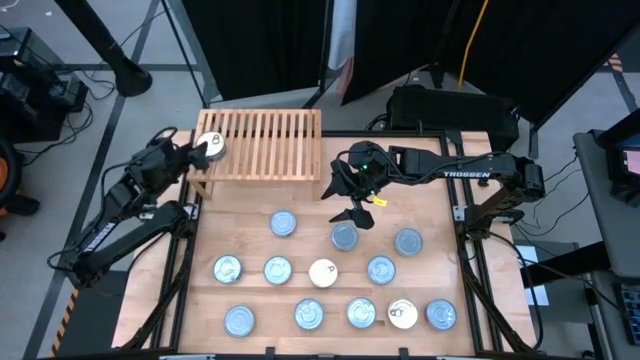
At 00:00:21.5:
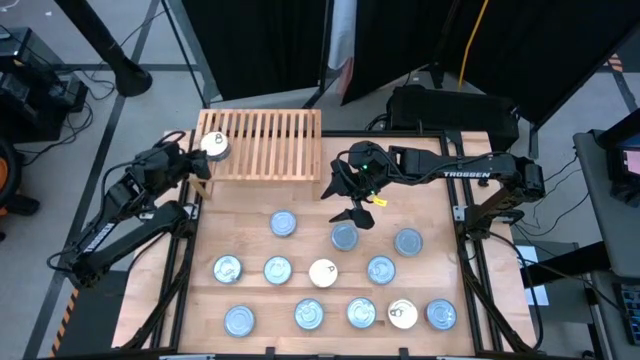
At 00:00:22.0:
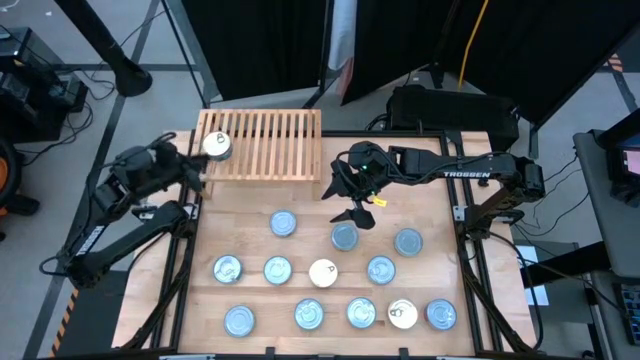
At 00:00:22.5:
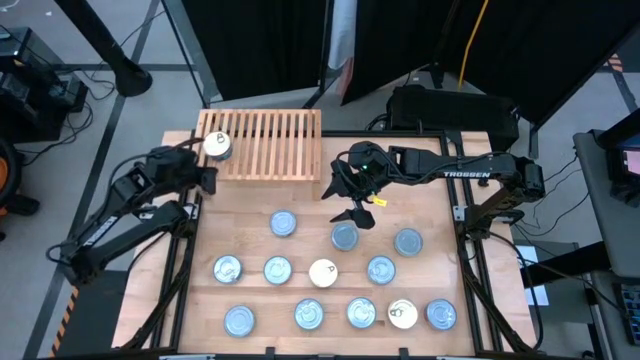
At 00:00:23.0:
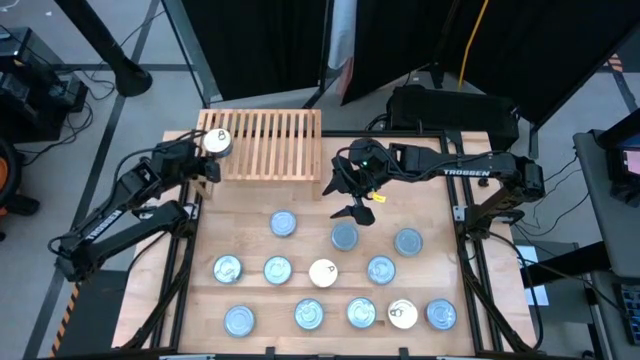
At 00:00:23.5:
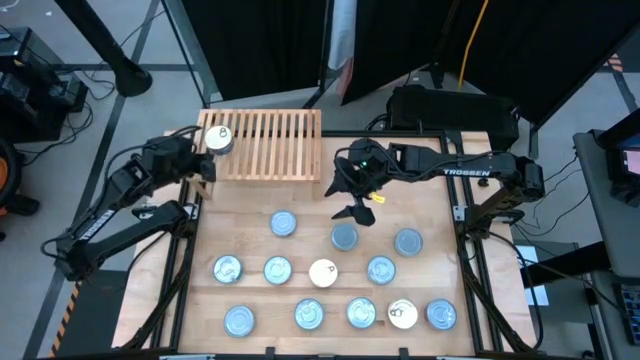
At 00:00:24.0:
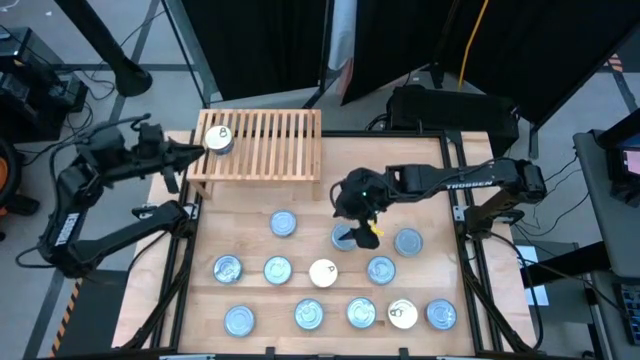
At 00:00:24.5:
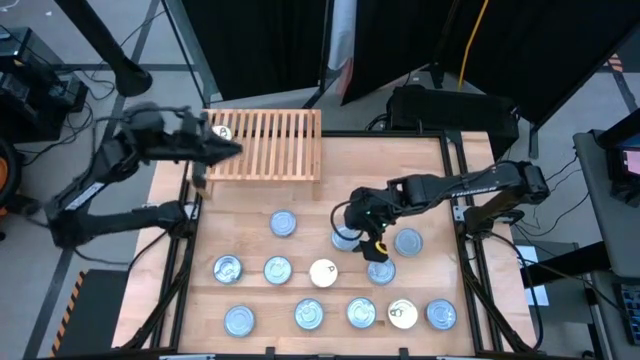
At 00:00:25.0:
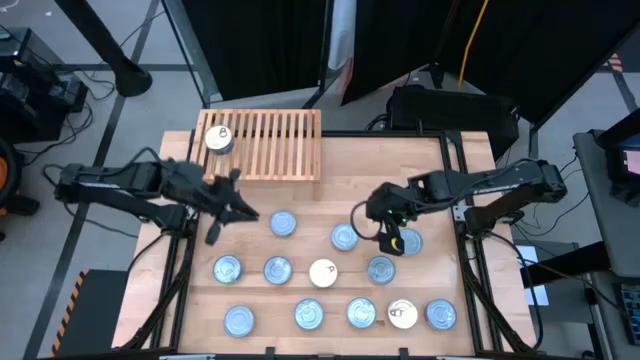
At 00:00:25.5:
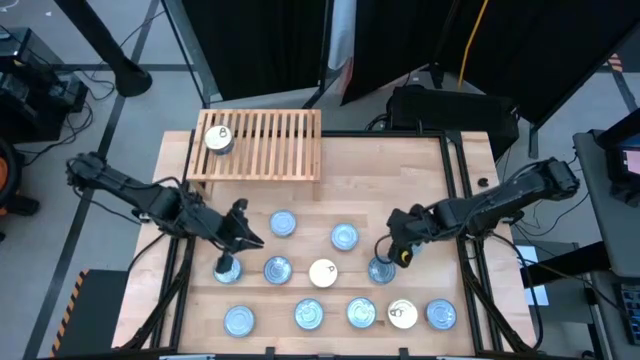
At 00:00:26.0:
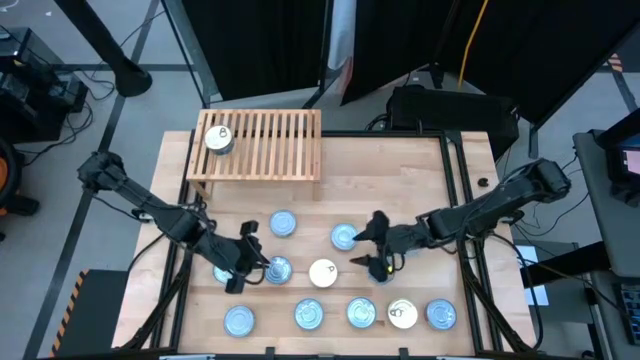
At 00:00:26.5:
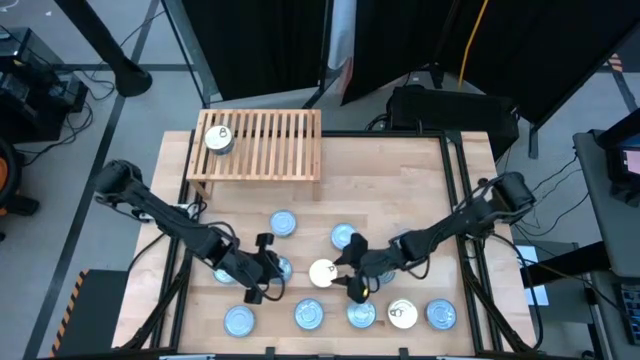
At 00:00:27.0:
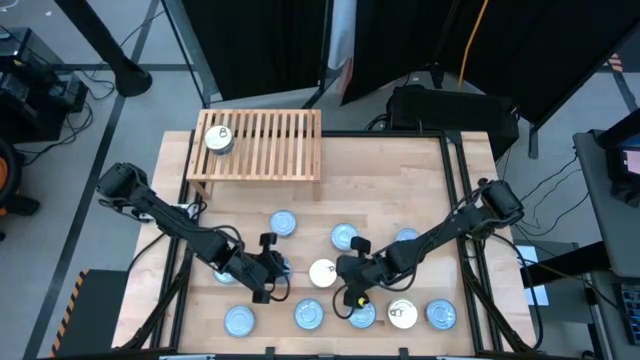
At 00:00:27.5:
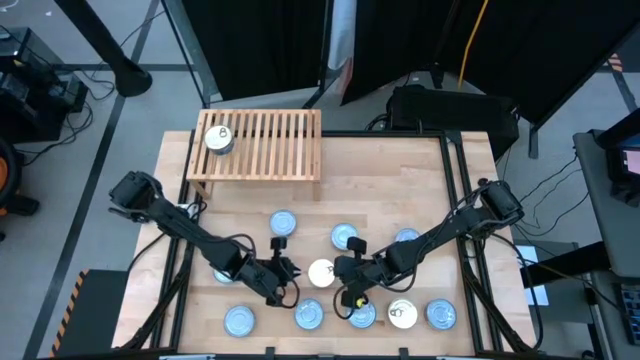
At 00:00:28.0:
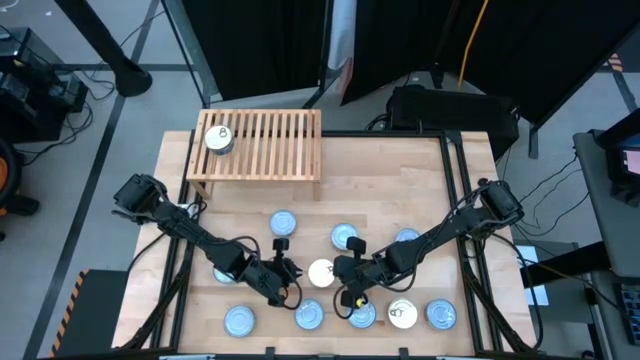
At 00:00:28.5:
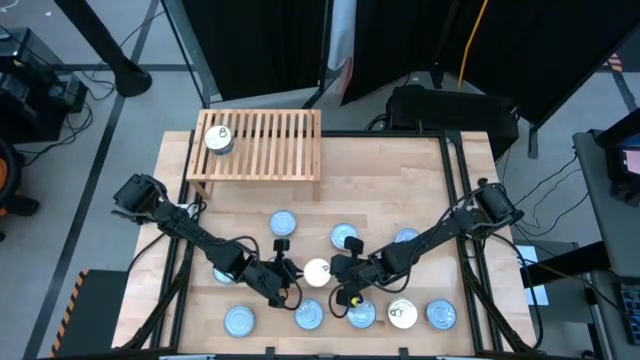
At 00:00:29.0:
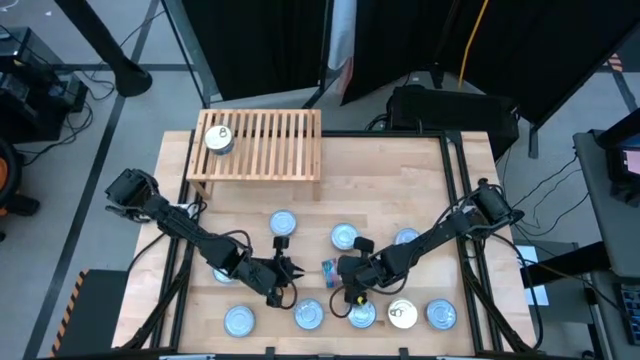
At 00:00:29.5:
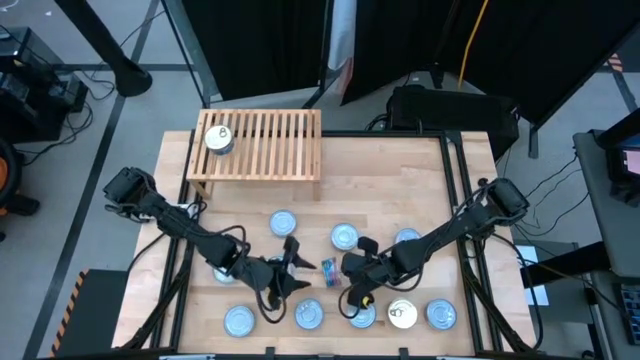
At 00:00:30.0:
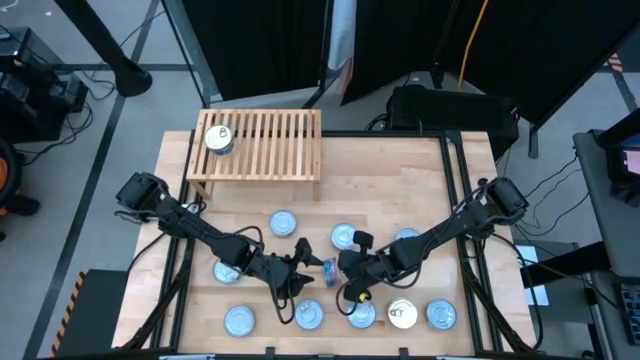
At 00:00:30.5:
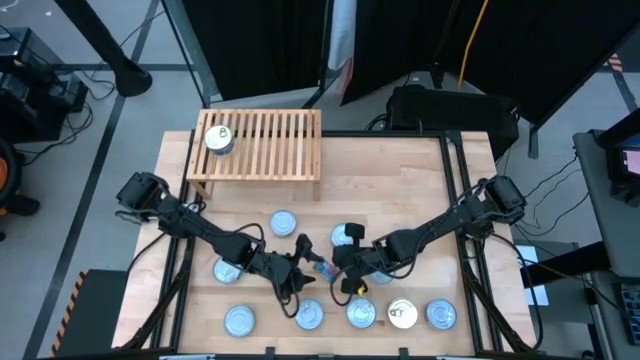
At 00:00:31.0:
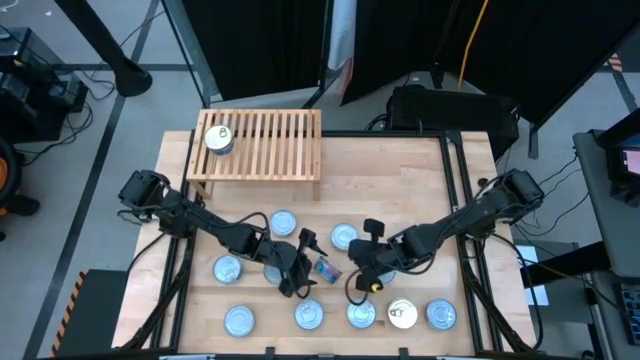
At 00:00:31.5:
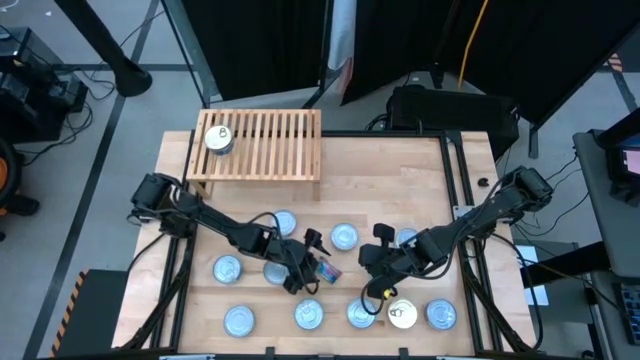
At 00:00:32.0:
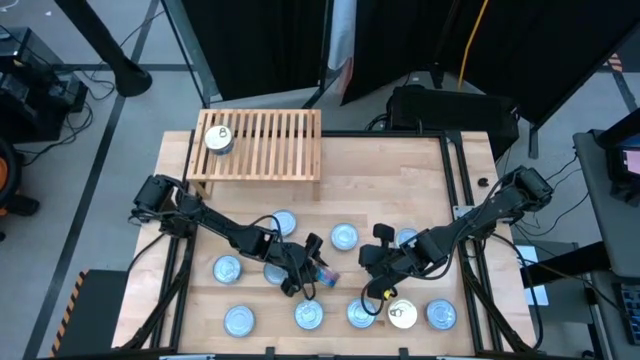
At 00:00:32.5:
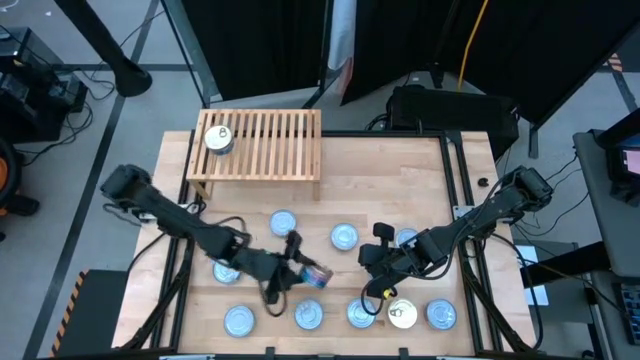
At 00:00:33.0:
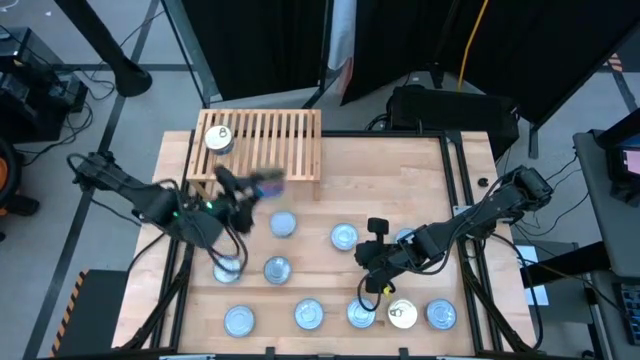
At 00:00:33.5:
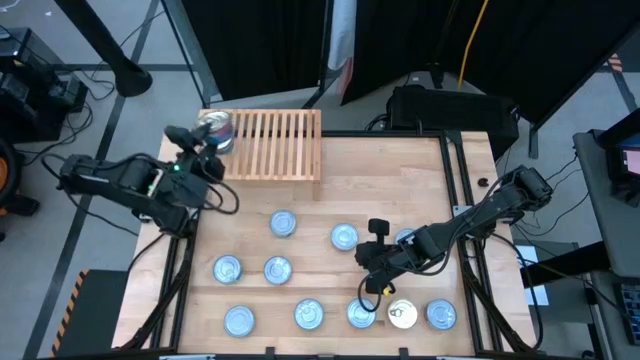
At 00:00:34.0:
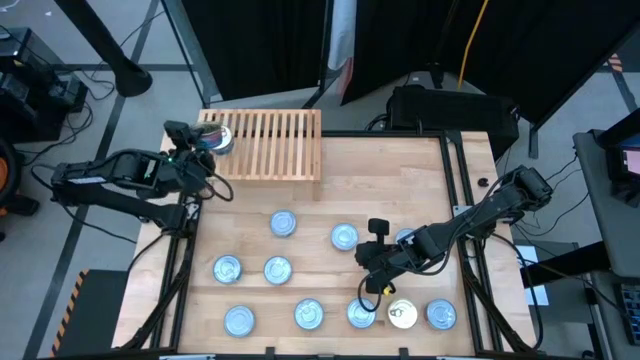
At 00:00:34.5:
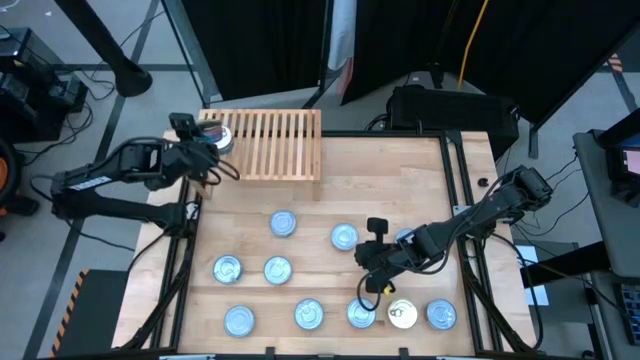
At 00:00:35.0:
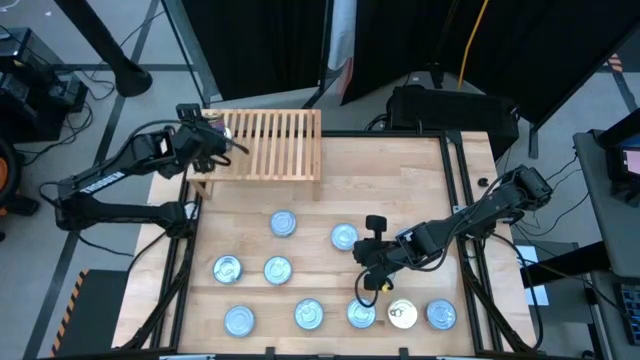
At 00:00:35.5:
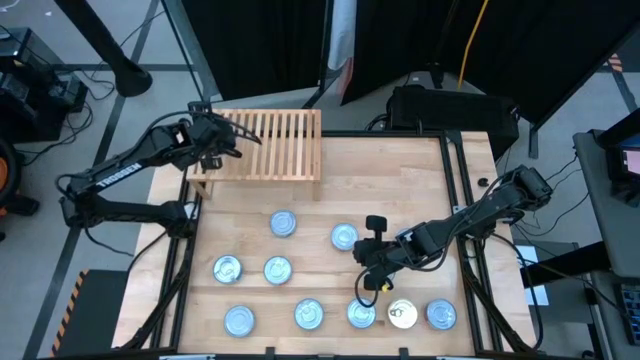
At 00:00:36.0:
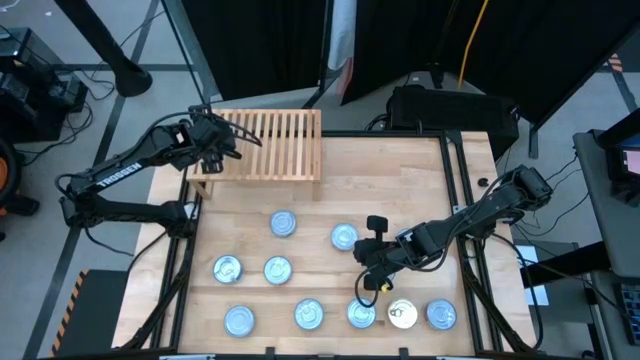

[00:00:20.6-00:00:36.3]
Task: Stack canned seafood by type on shelf
Stack the left blue can on top of the other blue can

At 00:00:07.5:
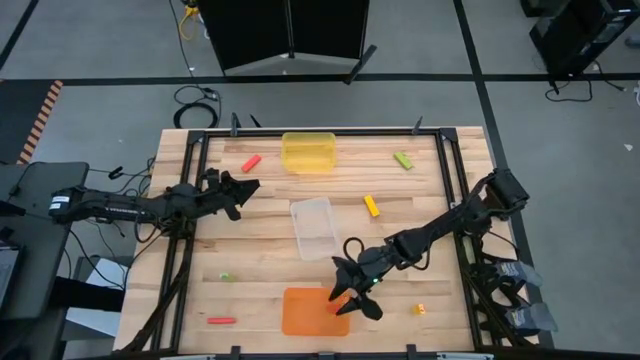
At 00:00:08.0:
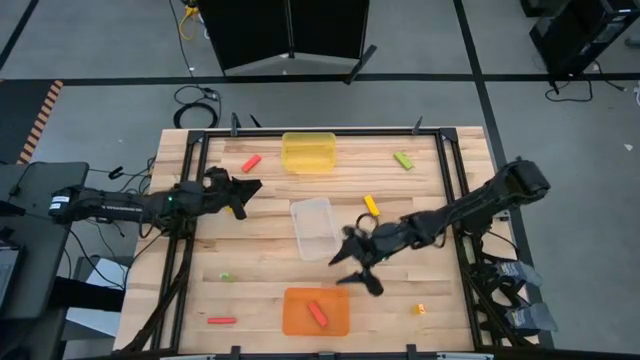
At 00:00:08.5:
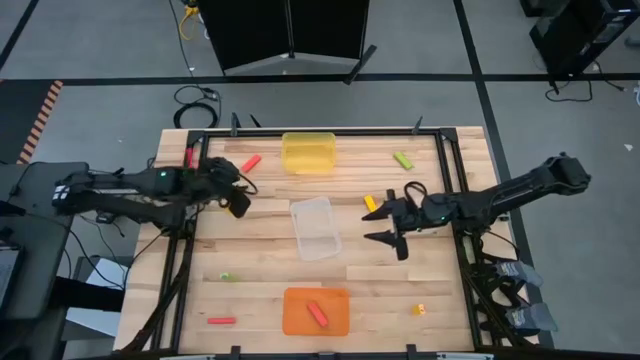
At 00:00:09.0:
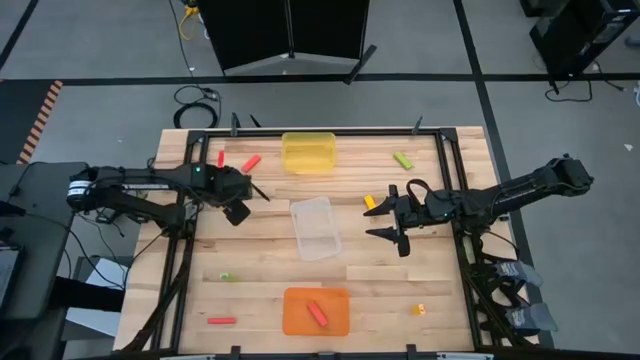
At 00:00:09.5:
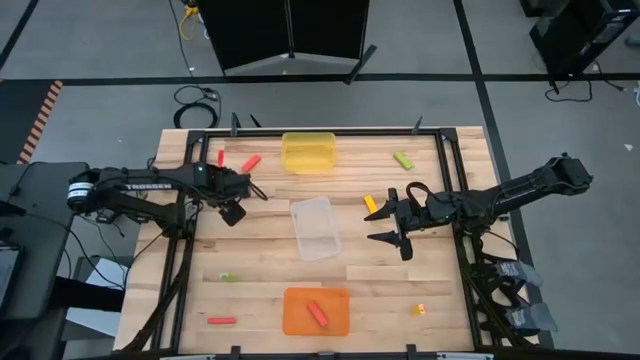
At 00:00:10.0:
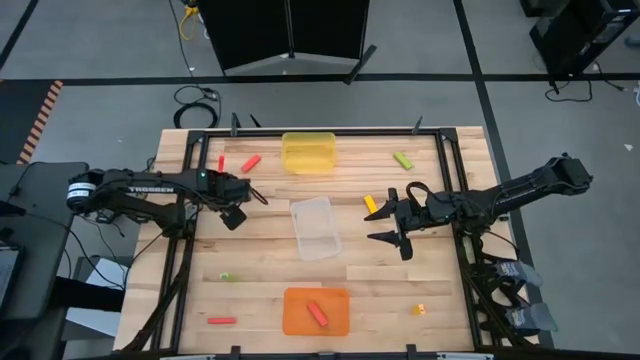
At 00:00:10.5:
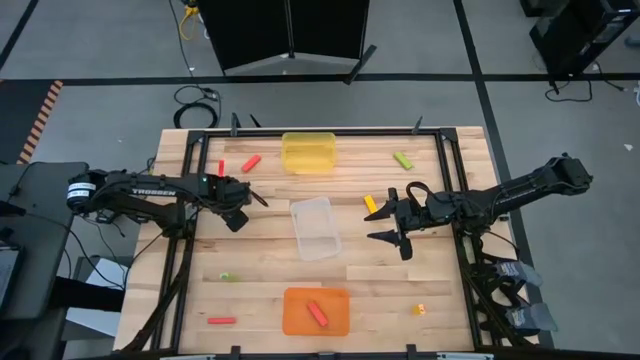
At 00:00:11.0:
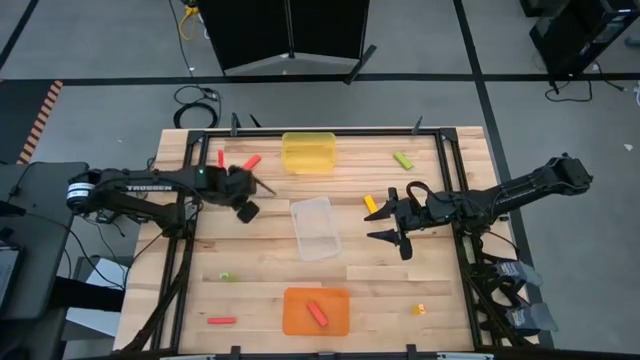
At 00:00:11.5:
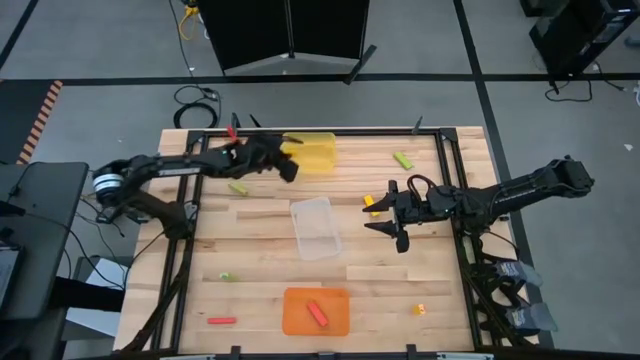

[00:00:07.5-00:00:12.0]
Task: Sort blocks
Put the top left yellow block into the yellow bin

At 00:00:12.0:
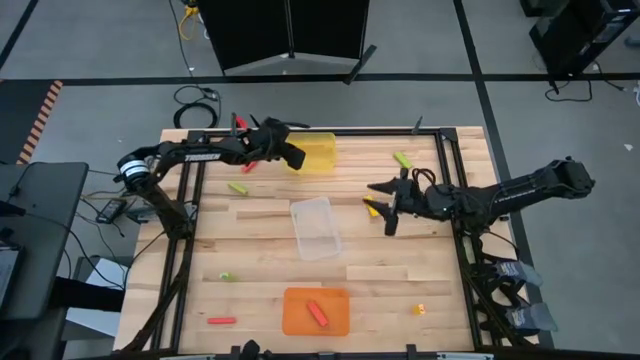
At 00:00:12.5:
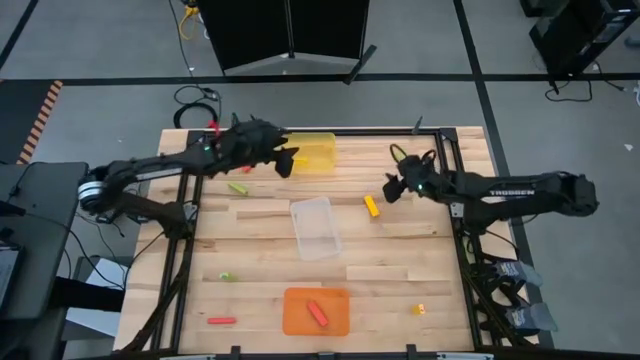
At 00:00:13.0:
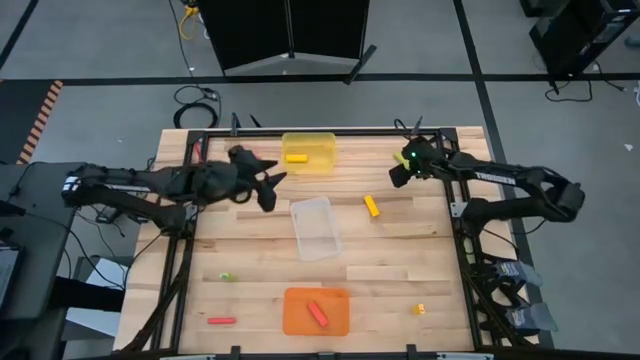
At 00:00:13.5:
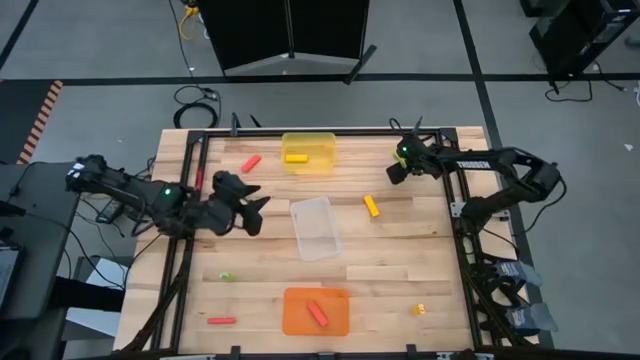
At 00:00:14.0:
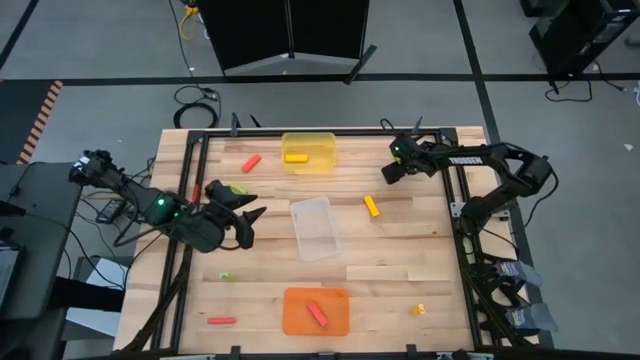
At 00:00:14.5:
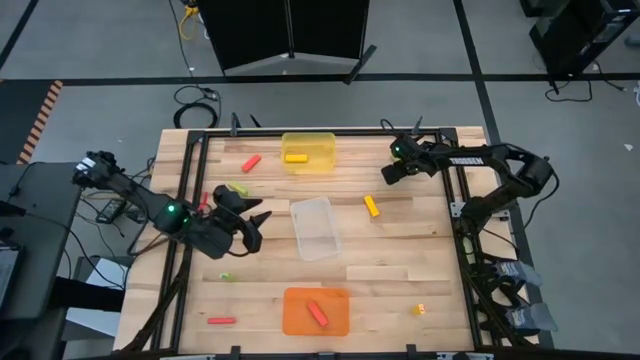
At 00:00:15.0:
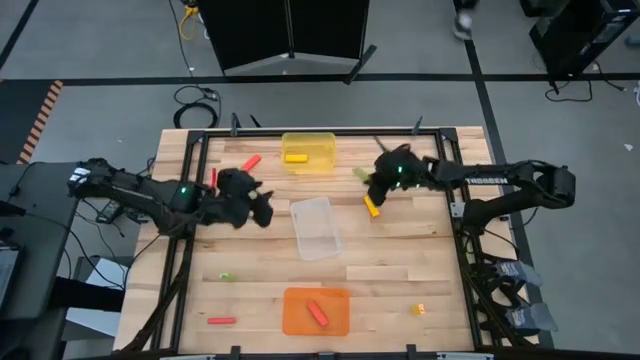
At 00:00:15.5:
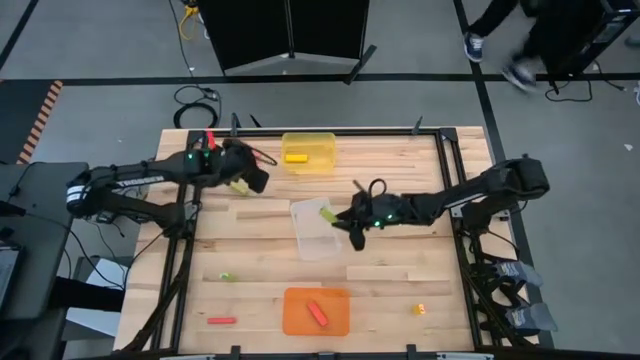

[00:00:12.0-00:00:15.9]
Put the top right green block into the transparent bin
